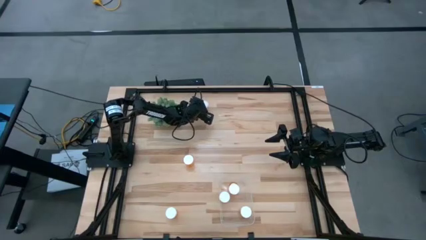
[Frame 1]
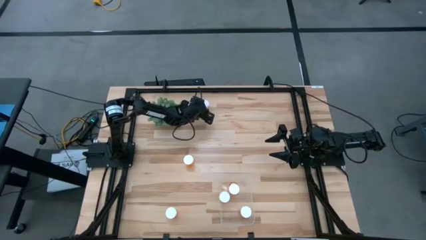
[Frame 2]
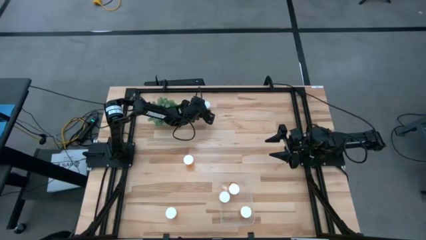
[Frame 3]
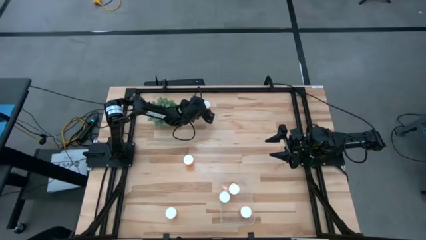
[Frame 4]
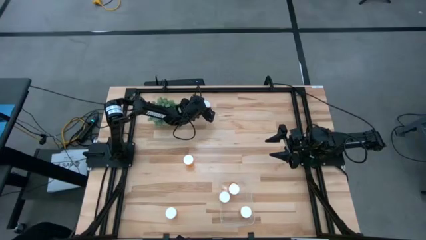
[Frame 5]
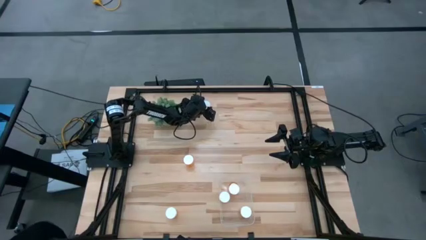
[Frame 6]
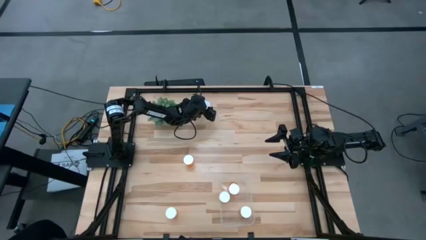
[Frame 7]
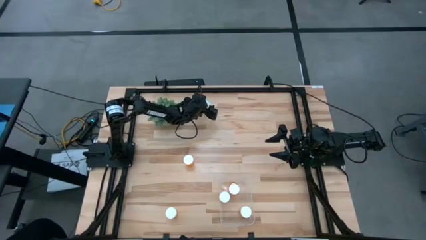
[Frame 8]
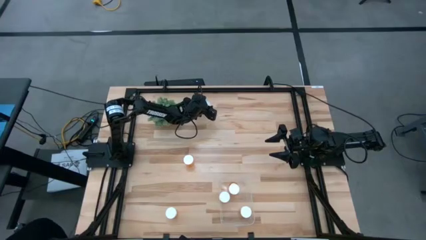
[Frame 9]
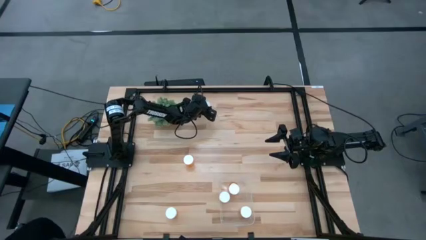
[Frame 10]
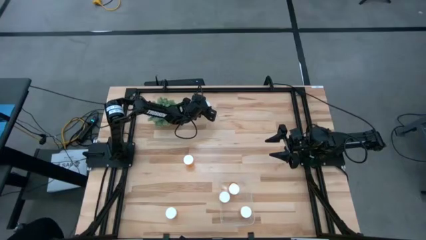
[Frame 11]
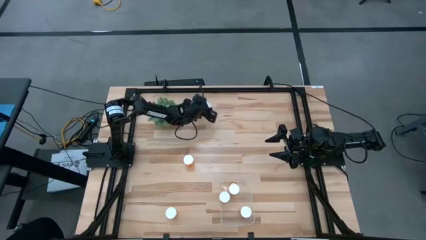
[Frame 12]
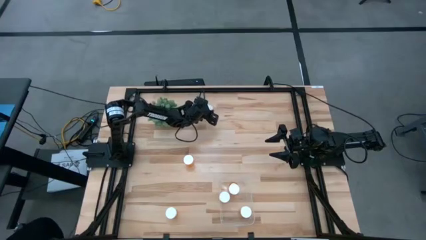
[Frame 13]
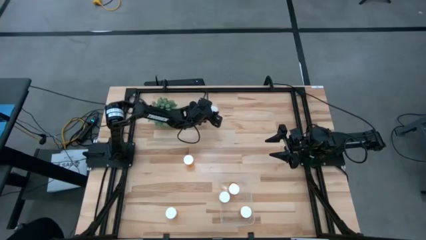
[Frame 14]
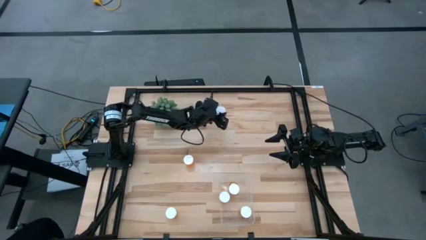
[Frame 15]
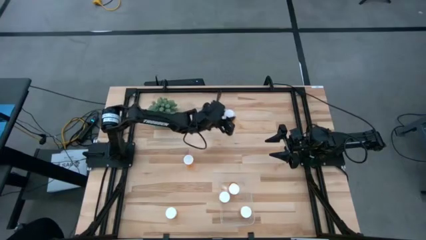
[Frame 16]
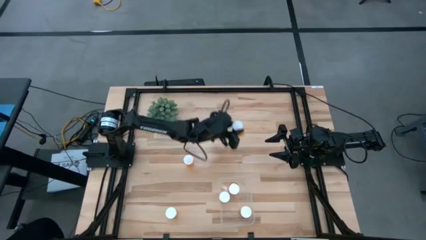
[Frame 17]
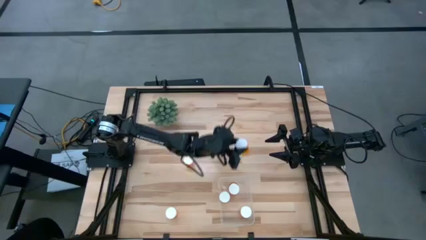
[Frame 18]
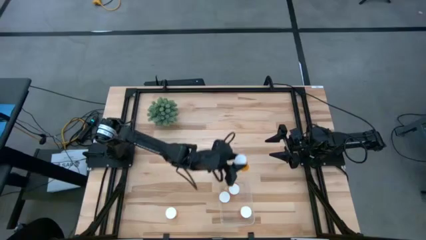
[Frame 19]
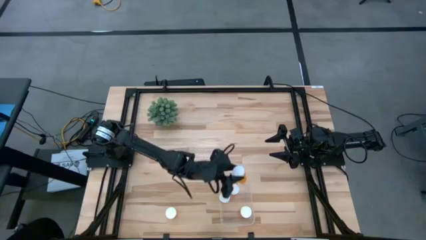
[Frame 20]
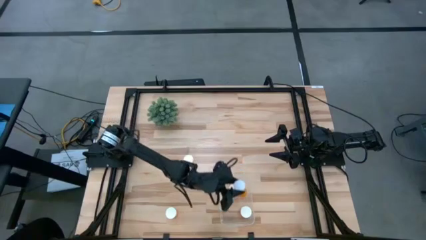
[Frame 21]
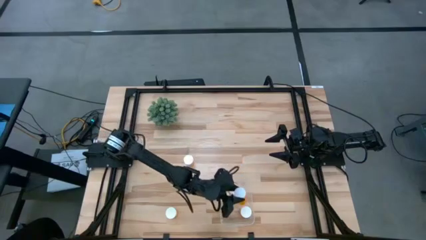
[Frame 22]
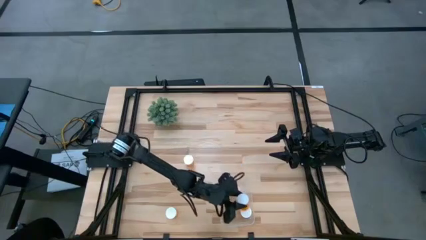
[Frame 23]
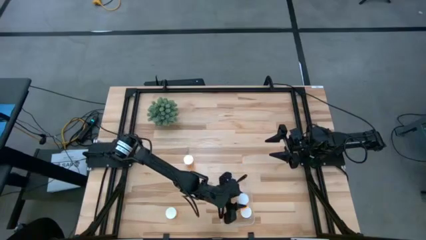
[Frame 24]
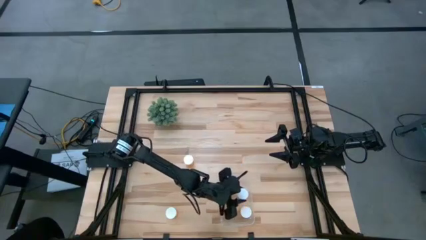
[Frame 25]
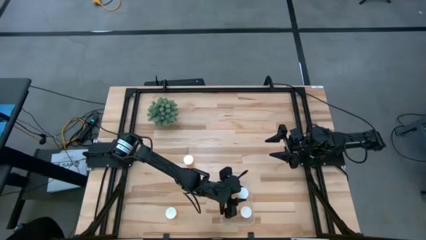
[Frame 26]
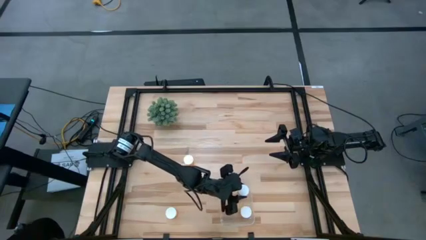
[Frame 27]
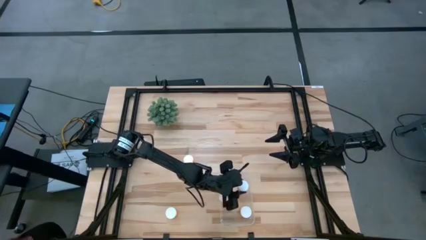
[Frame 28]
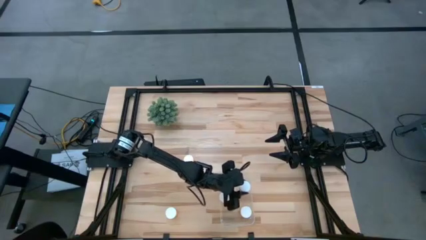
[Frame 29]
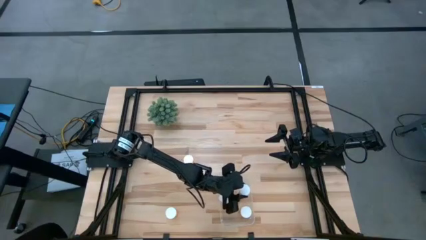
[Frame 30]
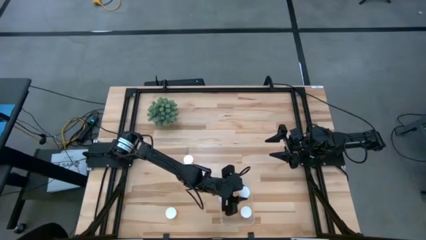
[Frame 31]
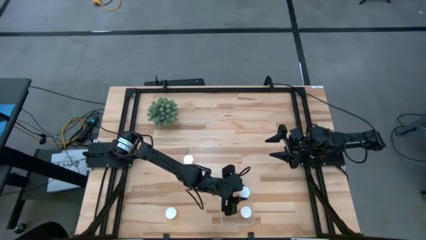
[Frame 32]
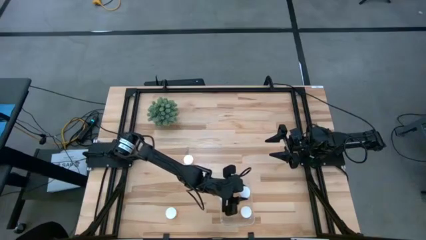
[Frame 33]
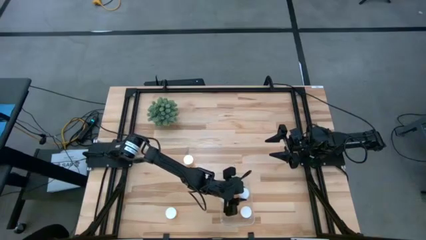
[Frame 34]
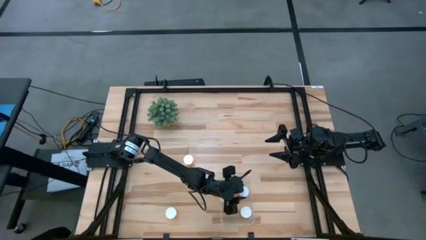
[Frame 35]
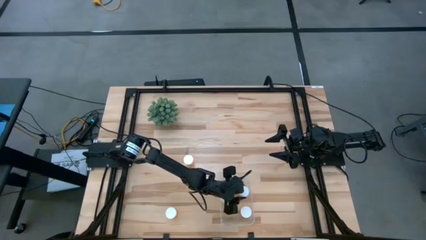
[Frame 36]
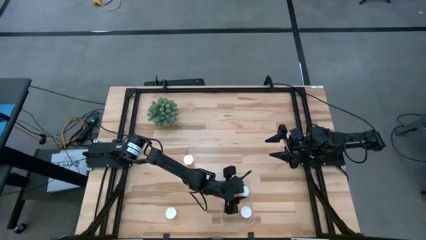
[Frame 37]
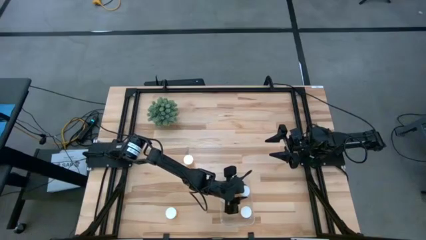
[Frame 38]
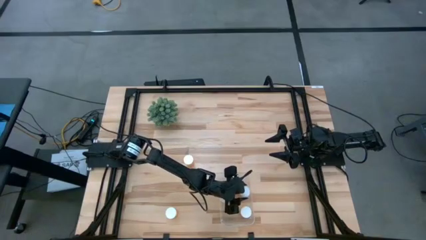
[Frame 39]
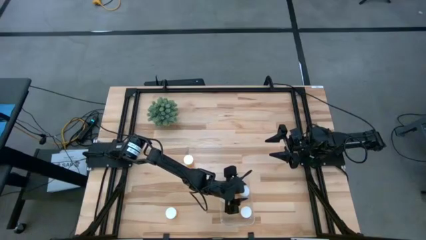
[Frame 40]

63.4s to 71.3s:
Task: Pick and place pill bottles into a basket
Put the top orange pill bottle into the transparent bin

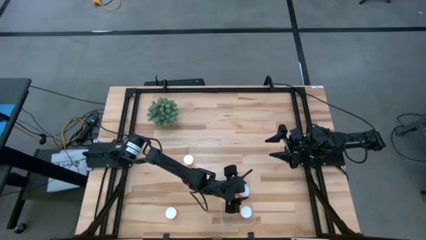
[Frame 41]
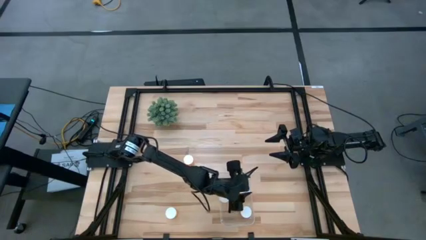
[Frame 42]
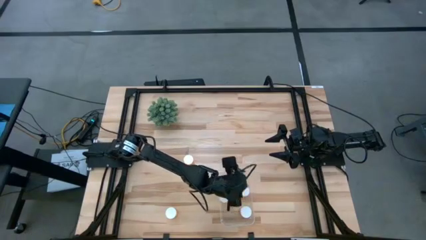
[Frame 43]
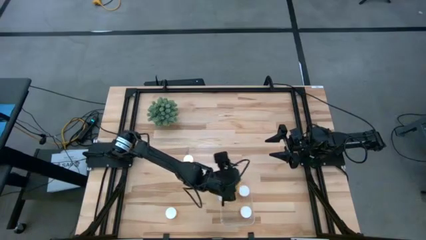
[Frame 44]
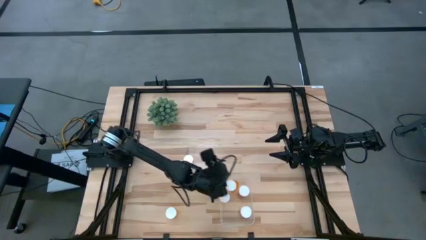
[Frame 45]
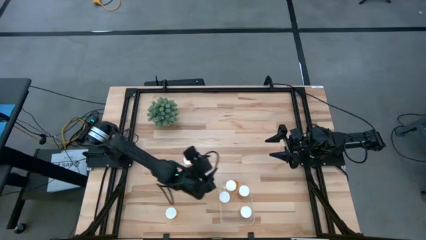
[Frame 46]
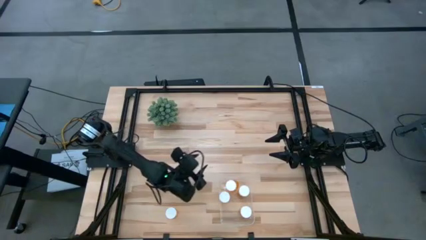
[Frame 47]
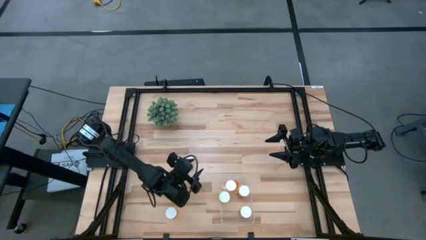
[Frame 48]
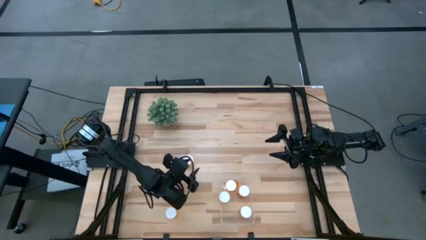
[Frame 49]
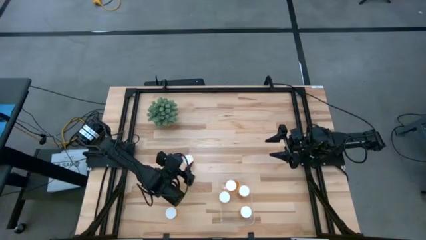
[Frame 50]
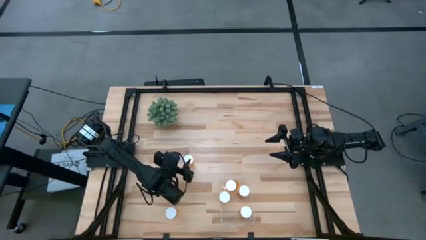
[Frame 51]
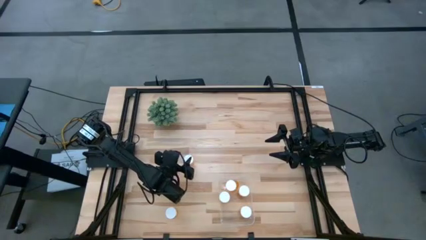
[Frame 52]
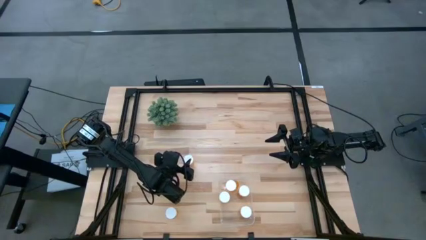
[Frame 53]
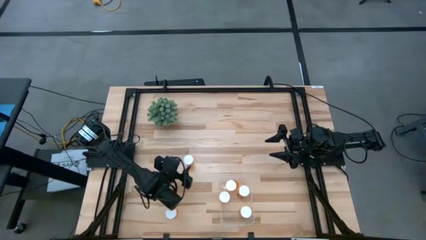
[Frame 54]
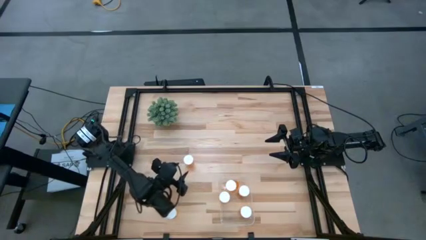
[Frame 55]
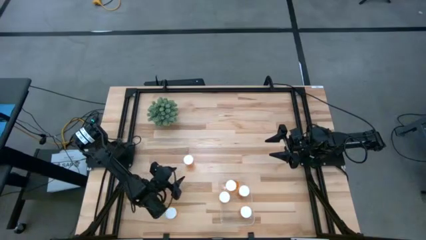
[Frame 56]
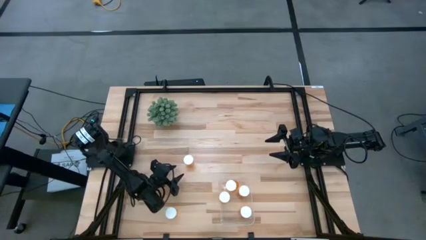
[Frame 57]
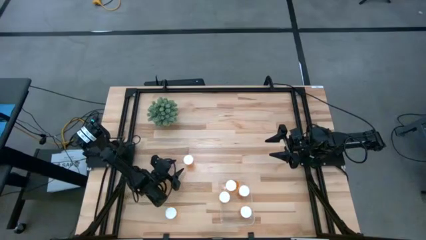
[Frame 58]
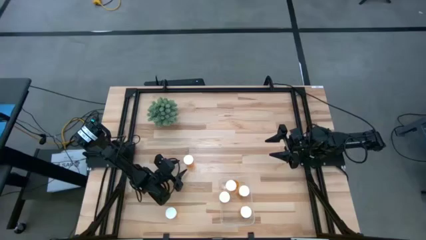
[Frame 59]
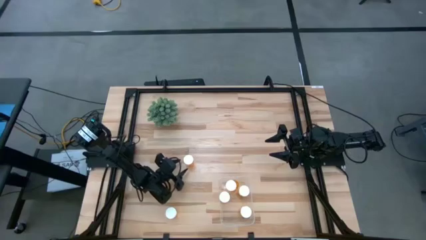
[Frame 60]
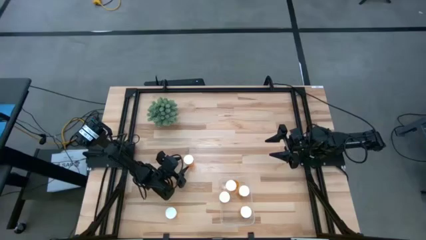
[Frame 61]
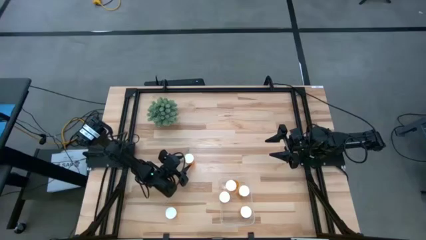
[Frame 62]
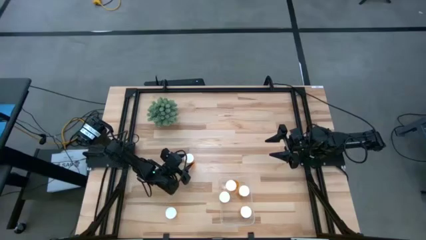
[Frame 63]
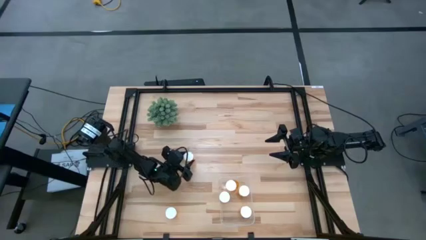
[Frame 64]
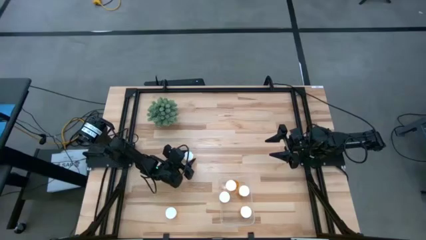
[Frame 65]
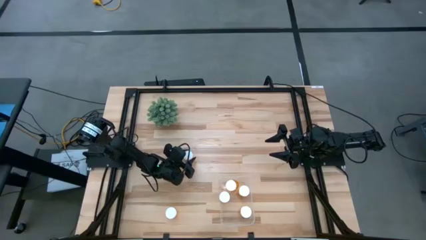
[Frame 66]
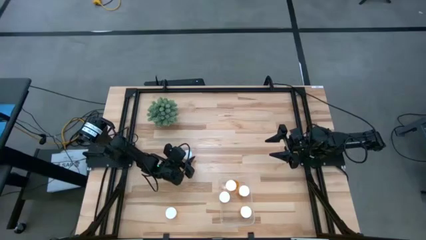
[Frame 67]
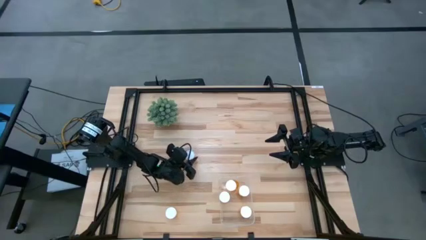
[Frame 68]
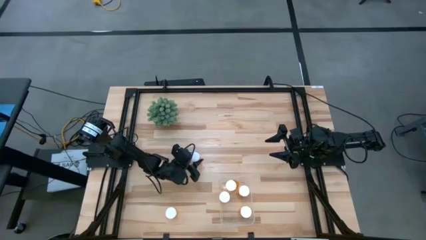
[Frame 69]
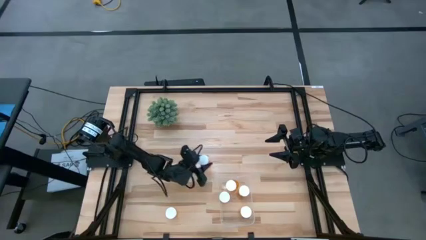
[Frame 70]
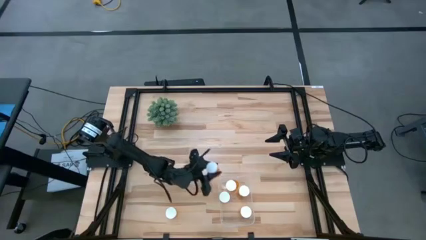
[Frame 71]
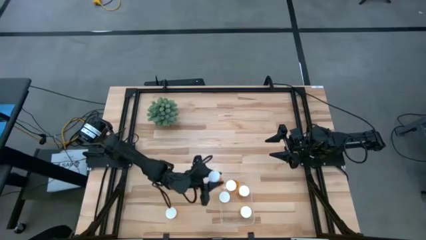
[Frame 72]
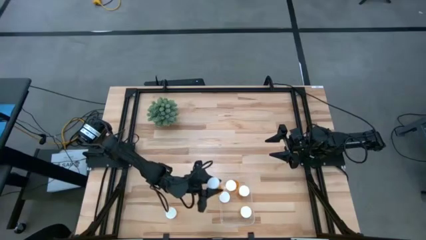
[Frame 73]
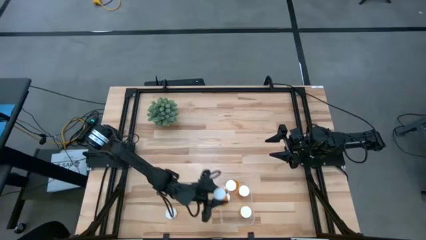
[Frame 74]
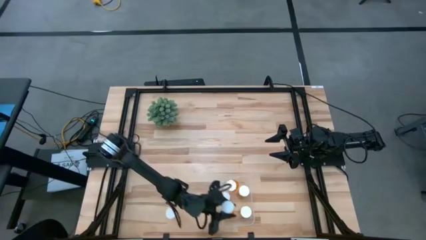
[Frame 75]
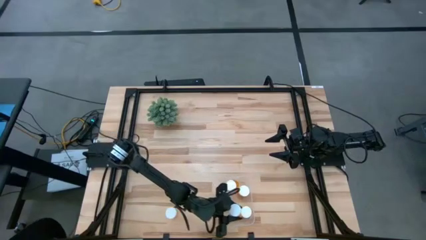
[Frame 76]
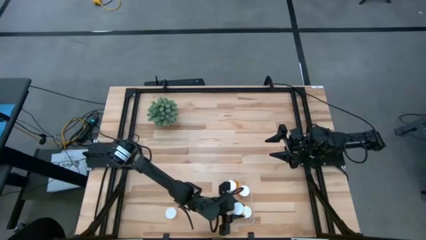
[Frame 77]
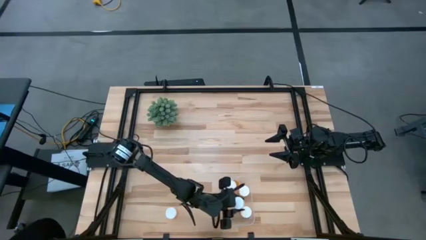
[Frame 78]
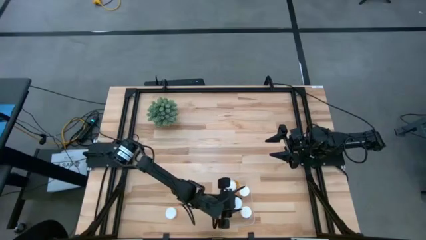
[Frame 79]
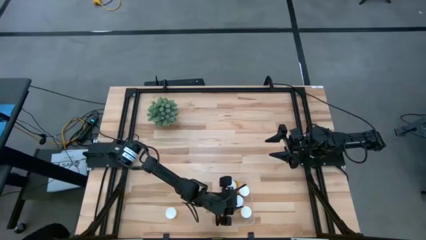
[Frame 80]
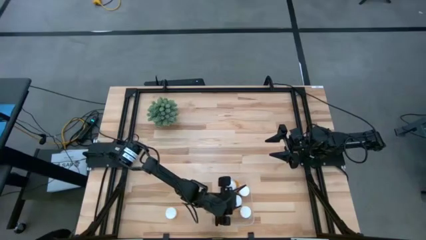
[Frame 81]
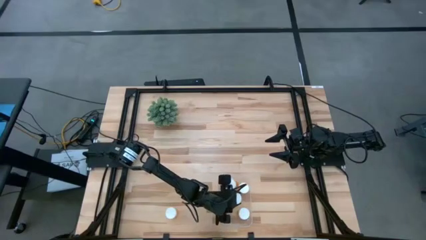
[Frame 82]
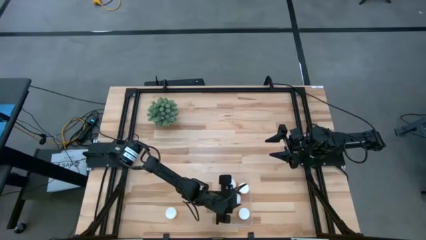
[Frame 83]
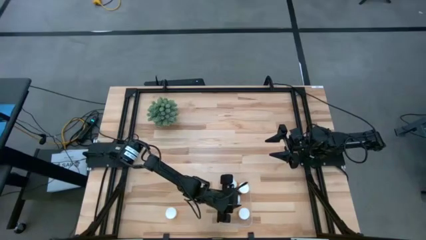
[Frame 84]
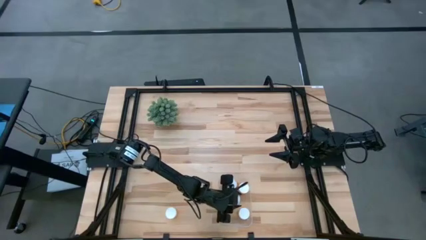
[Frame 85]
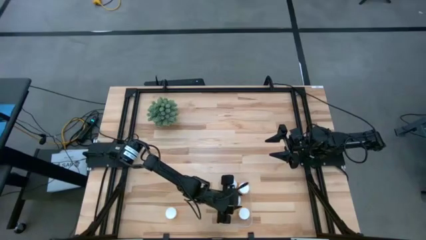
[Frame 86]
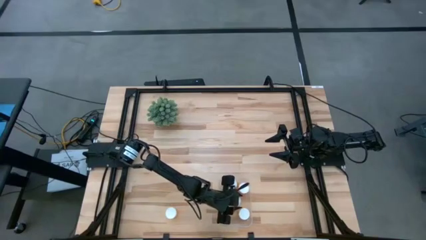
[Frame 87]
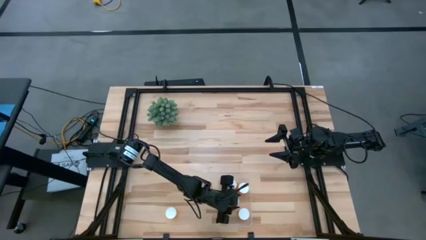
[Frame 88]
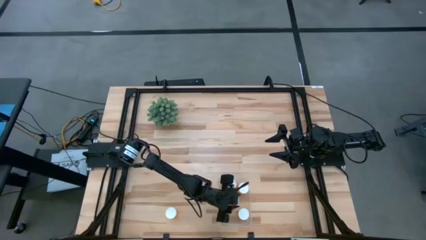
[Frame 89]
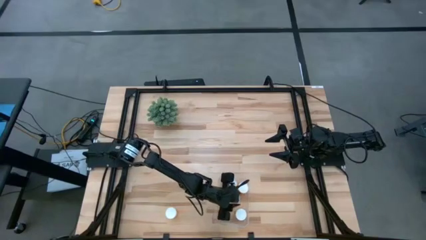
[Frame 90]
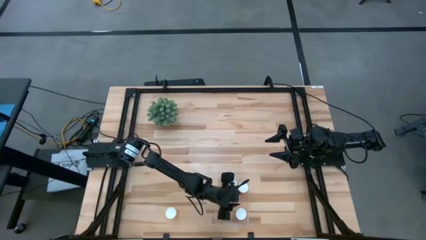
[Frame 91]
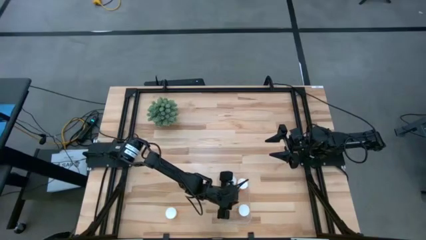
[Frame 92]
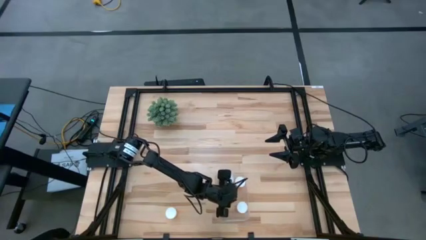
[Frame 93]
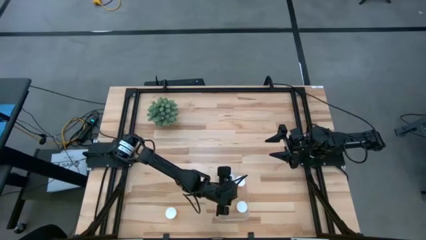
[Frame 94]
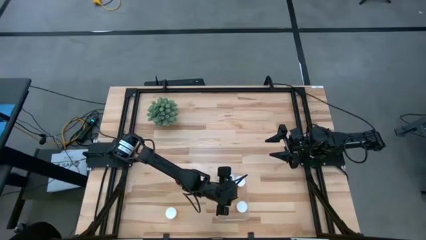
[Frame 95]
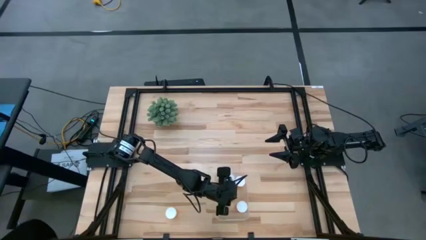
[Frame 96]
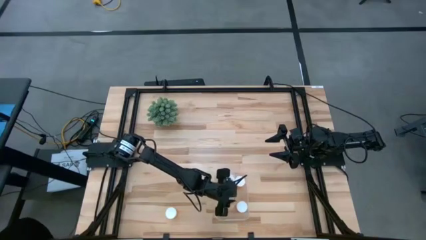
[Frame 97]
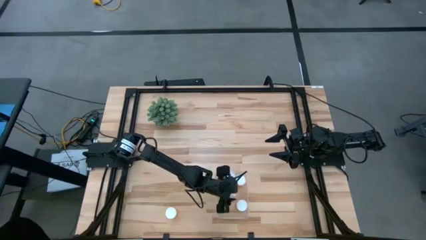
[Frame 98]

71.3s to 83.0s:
Put the top orange pill bottle into the transparent bin
